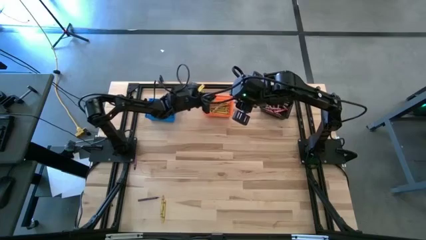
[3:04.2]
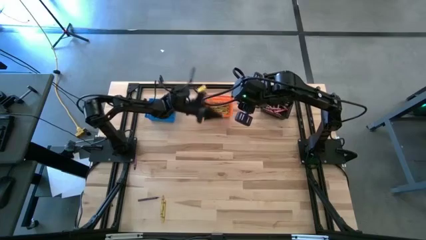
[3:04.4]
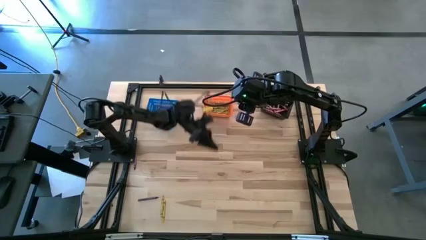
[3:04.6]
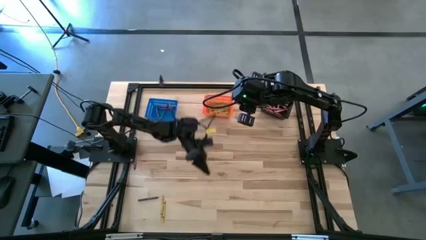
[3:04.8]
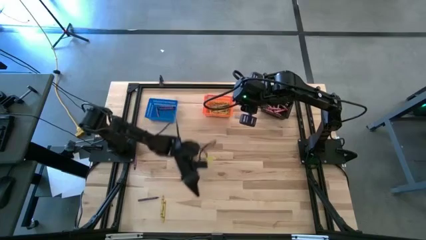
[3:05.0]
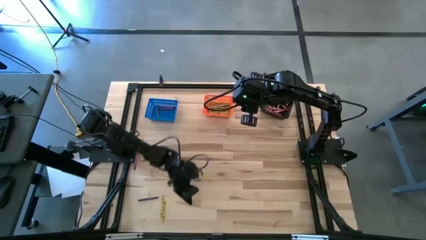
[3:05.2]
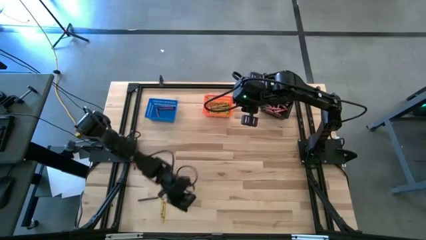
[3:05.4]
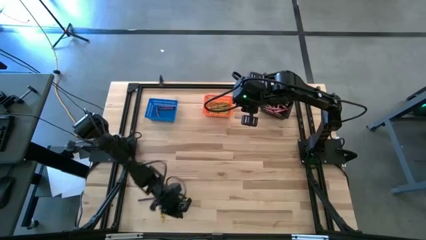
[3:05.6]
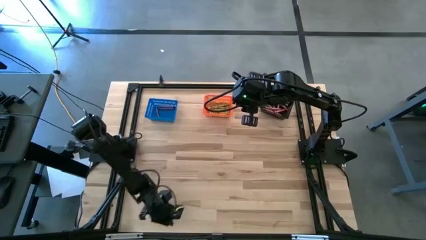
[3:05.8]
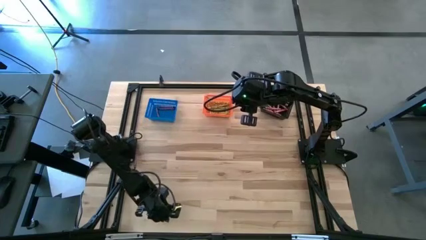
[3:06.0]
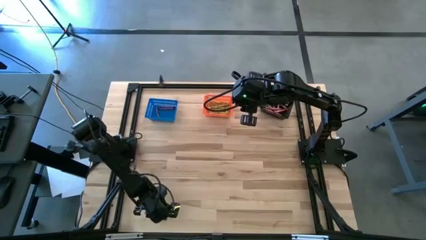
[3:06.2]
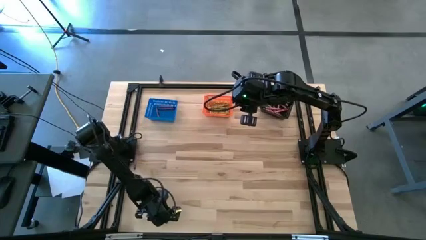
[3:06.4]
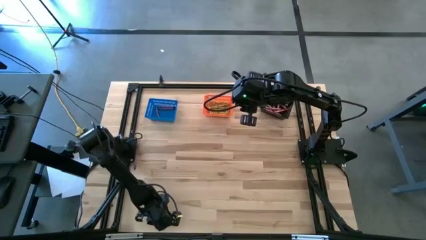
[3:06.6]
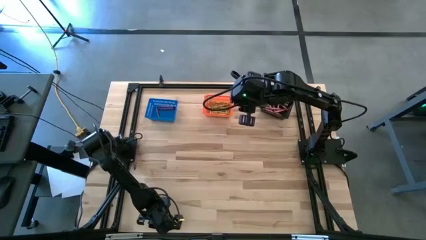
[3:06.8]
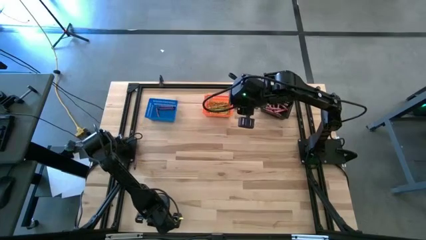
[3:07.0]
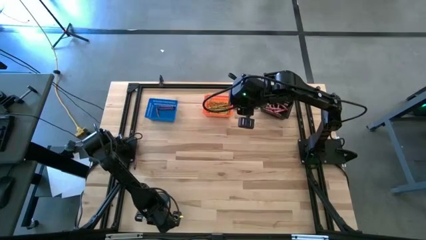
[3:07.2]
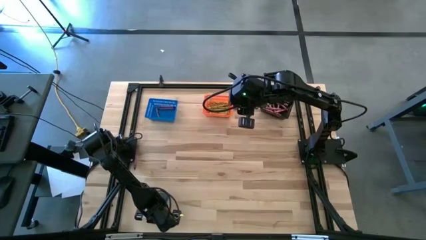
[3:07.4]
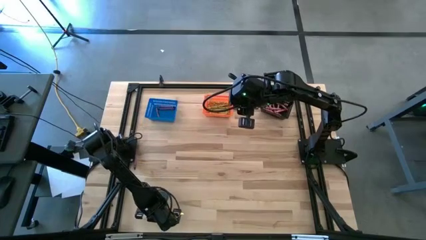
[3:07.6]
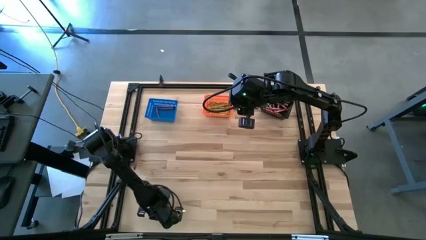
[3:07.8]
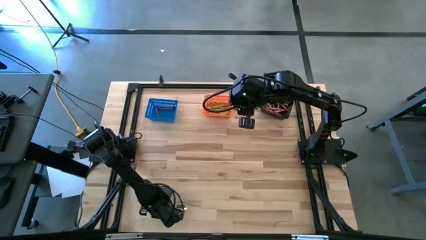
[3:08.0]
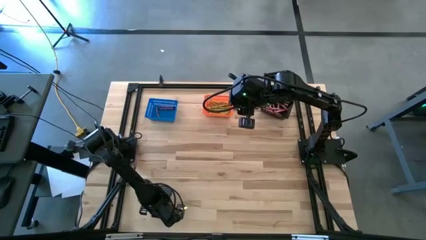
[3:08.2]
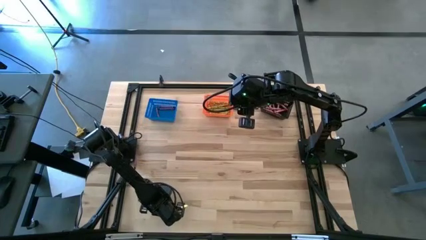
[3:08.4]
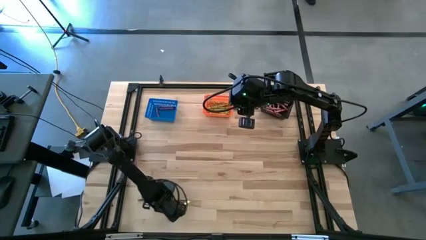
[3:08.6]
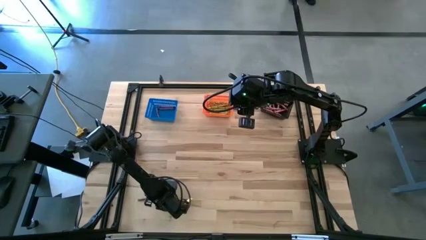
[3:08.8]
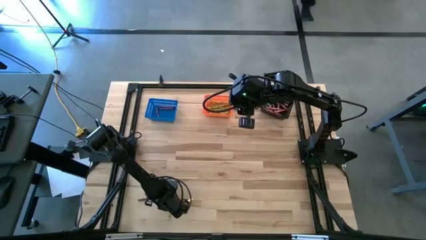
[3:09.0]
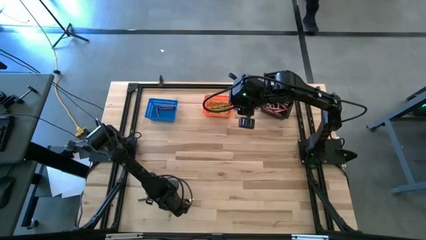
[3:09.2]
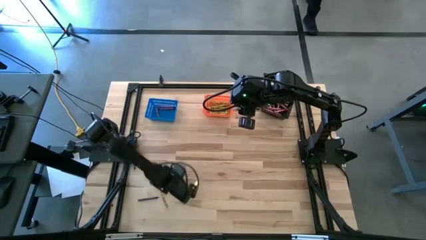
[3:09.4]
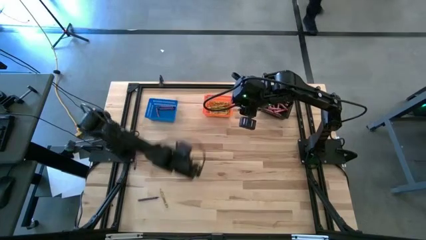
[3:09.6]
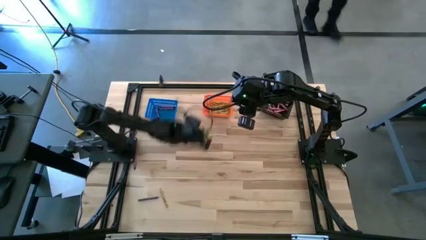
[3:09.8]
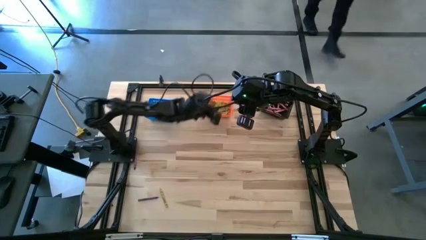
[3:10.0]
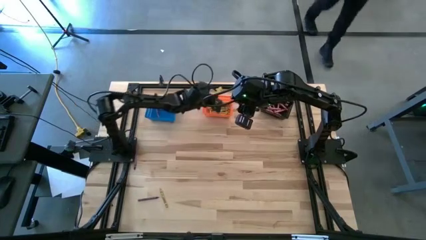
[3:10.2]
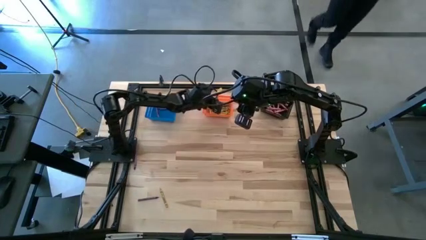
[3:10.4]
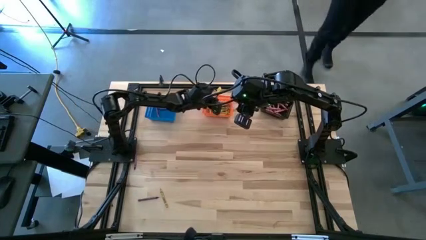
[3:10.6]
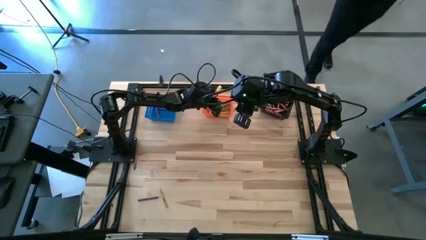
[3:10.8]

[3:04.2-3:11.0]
Task: Sort crayons
Put the right yellow crayon into the orange bin

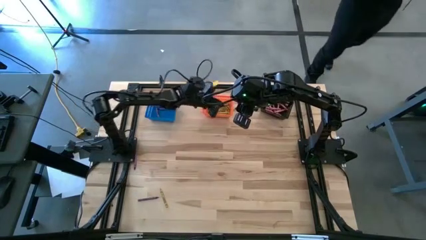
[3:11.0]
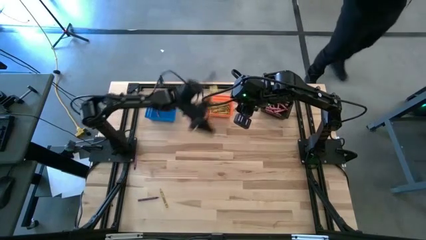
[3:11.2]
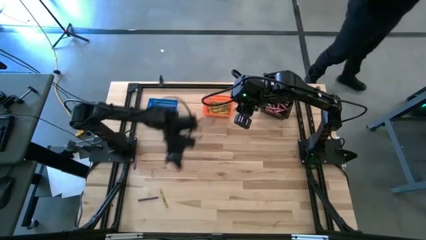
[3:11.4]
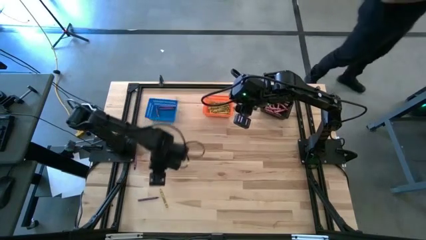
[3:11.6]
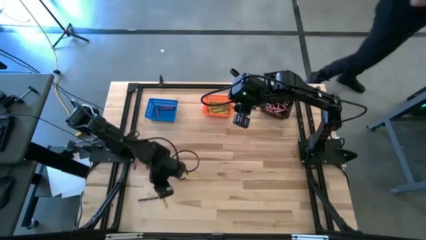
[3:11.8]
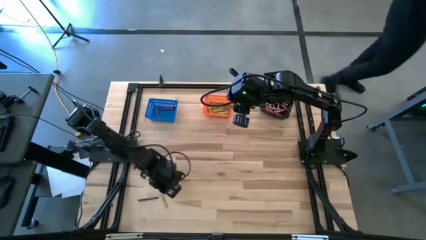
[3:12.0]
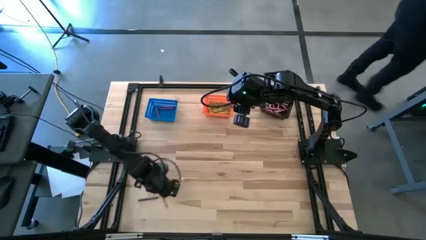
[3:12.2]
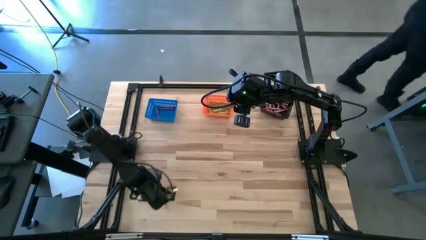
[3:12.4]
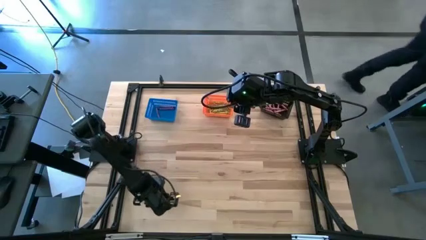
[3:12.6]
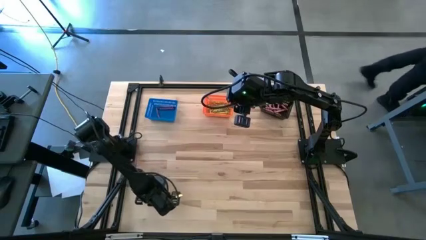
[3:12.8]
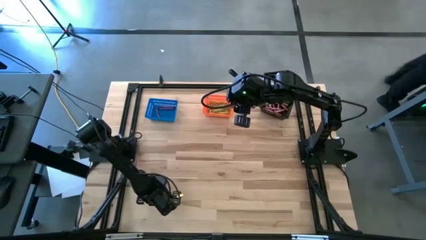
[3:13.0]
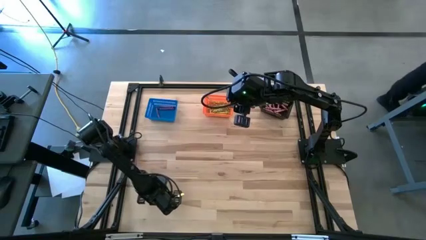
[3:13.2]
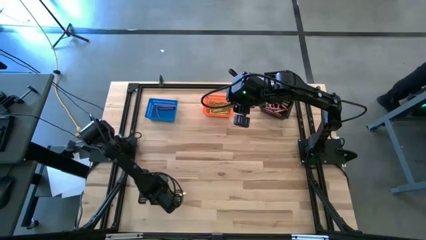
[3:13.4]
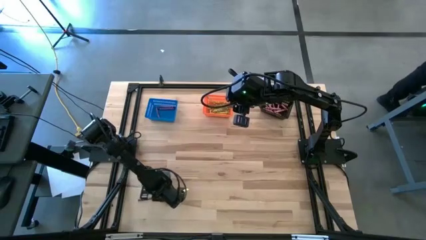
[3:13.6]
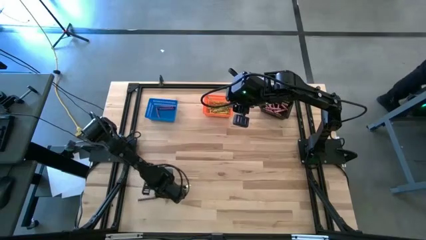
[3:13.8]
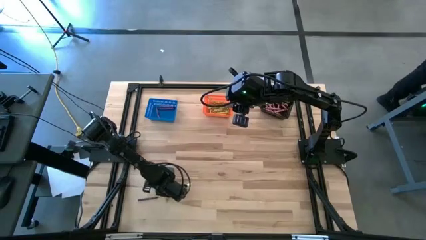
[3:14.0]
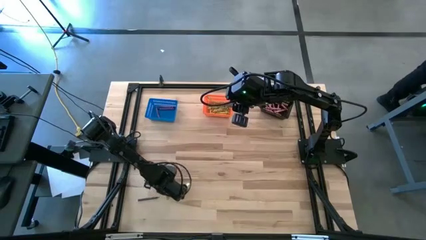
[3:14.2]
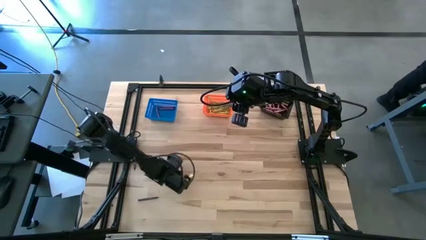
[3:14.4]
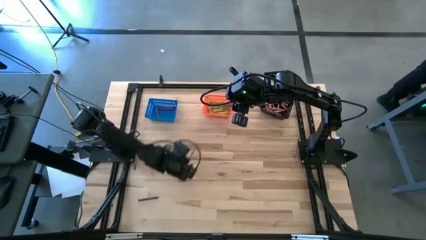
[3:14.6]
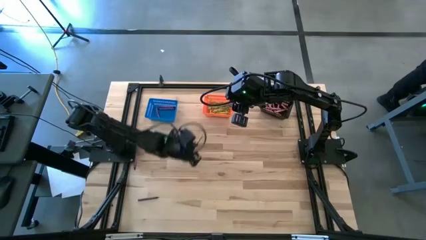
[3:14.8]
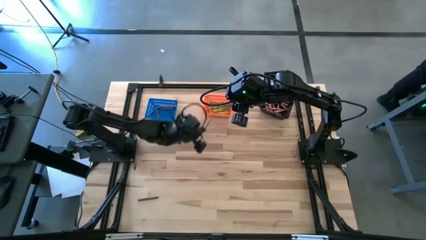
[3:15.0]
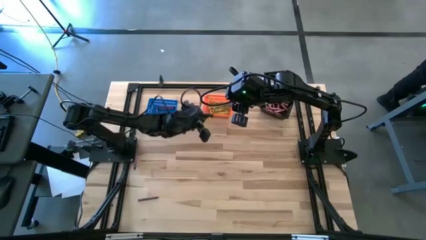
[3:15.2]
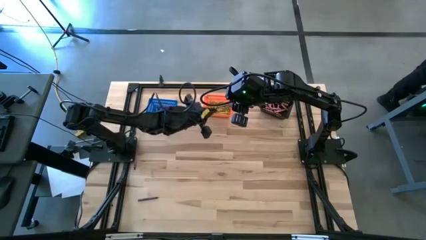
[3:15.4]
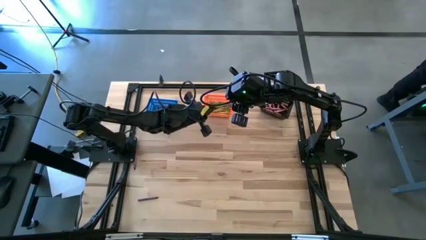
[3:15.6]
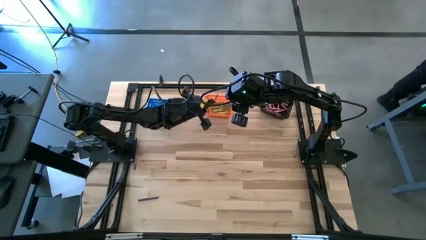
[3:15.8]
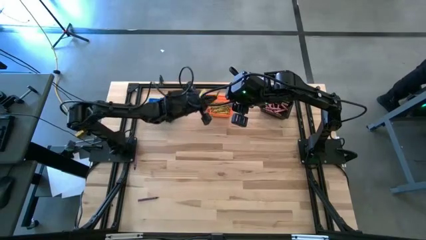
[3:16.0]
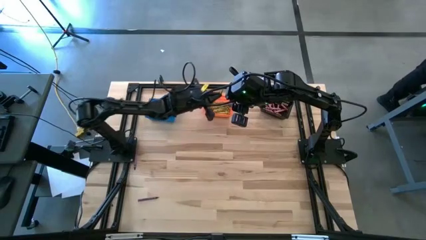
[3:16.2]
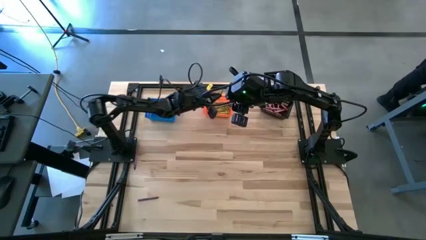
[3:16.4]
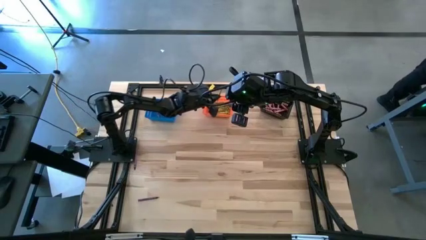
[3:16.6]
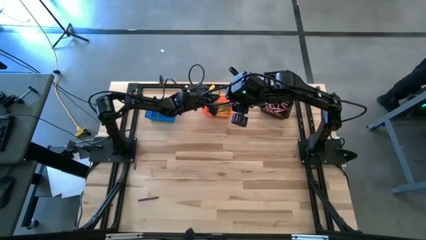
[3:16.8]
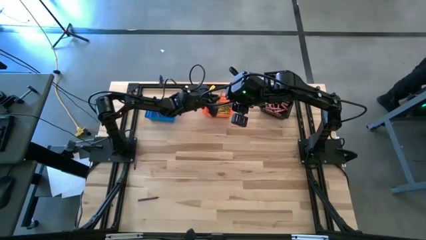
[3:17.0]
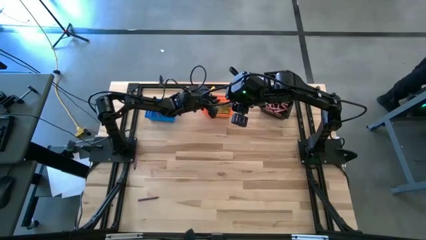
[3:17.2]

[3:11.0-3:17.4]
Put the yellow crayon into the orange bin

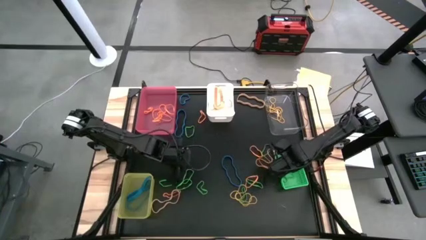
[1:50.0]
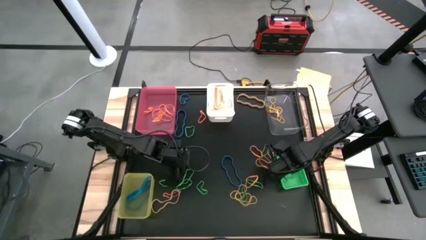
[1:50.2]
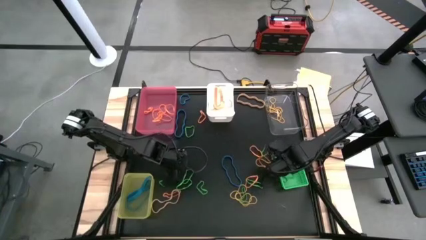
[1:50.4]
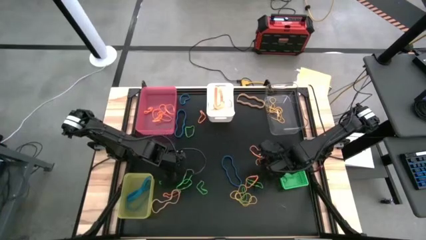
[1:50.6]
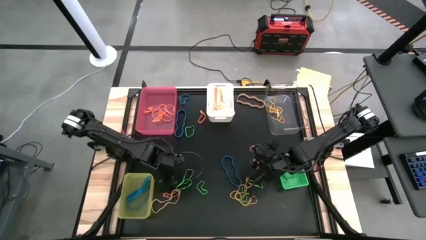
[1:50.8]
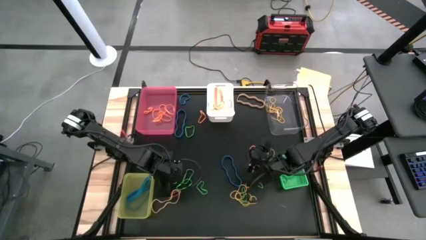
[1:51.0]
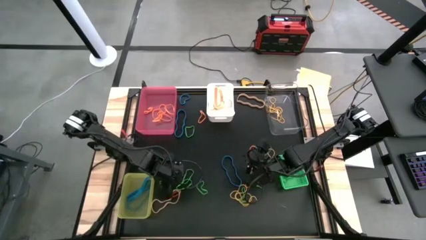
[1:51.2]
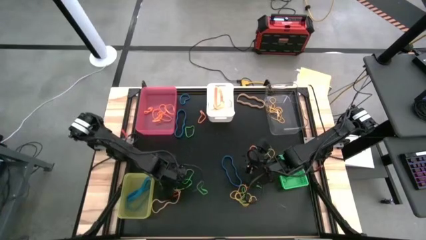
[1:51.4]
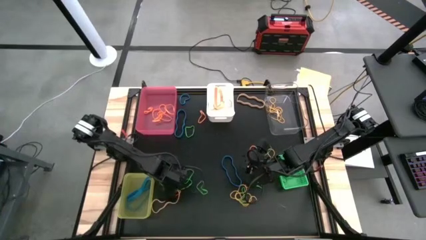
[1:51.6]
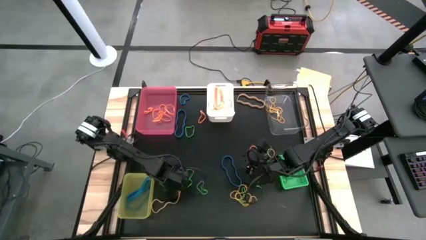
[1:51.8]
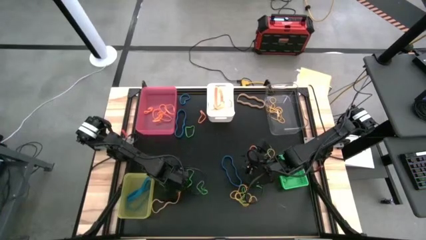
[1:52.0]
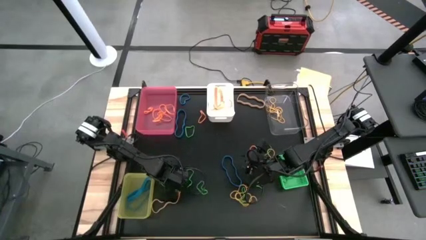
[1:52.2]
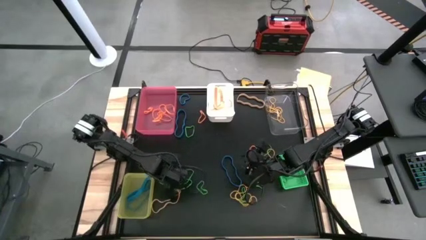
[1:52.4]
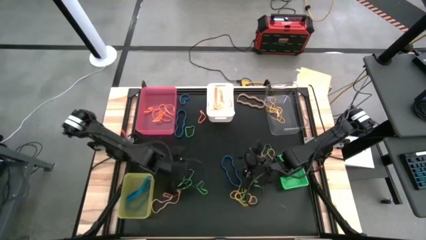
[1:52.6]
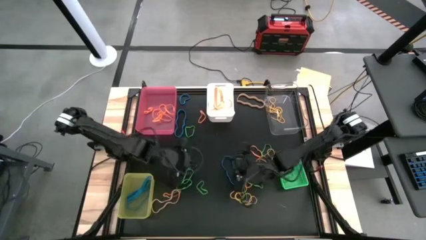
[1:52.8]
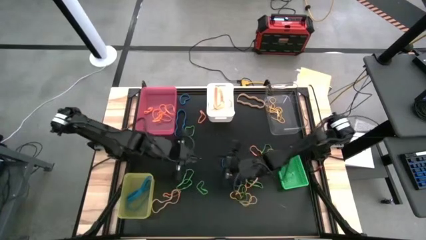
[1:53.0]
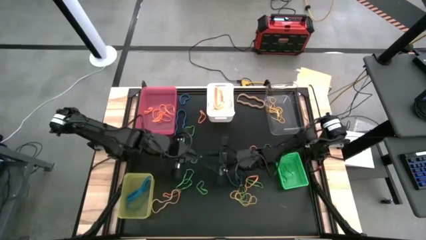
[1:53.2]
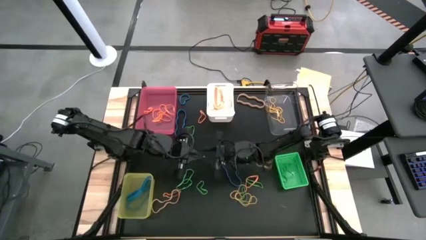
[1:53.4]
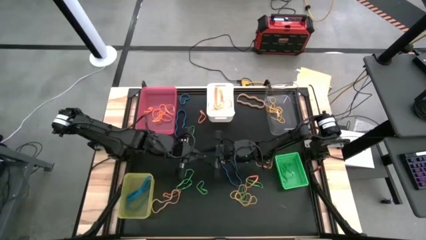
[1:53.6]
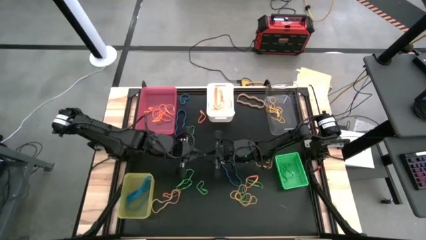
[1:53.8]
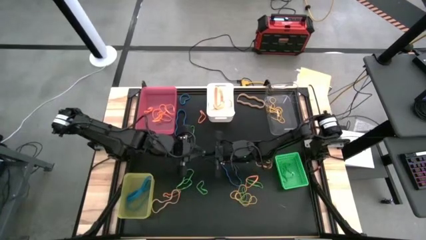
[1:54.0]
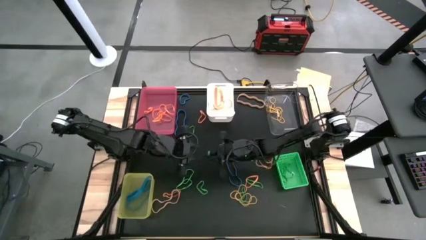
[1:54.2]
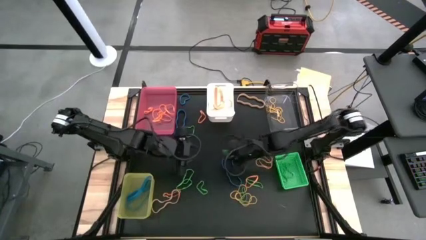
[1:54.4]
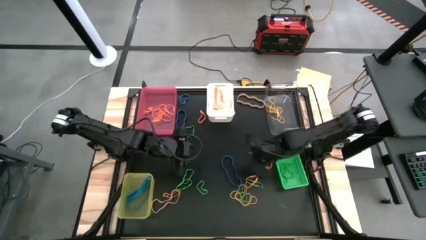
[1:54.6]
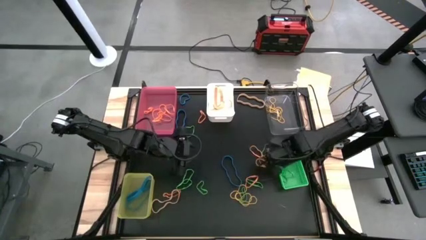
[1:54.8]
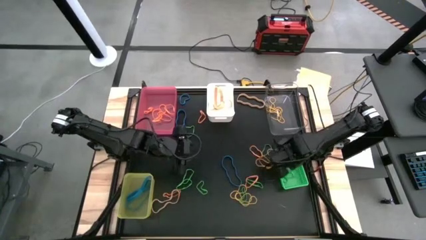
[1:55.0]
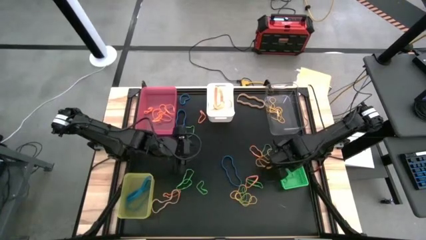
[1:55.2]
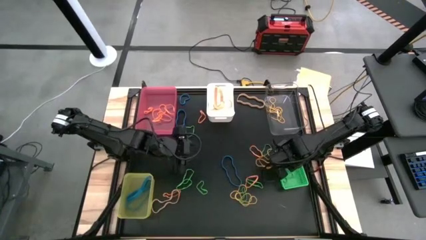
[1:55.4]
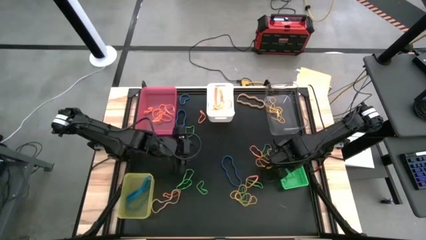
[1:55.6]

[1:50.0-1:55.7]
Task: Sort rubber bands into baskets
Put the green rubber band into the green bin
